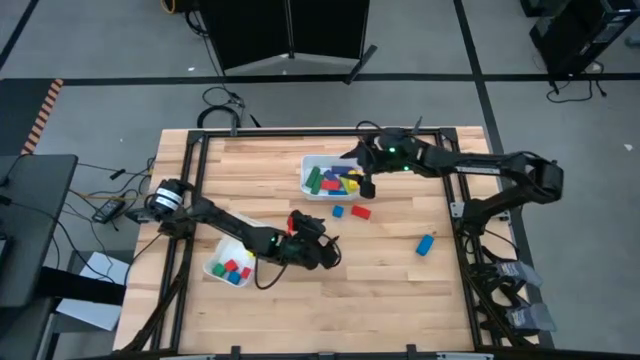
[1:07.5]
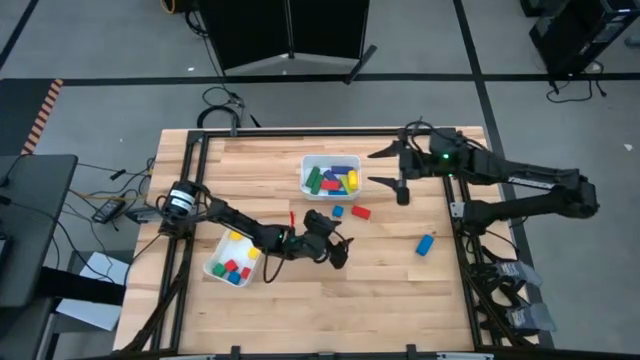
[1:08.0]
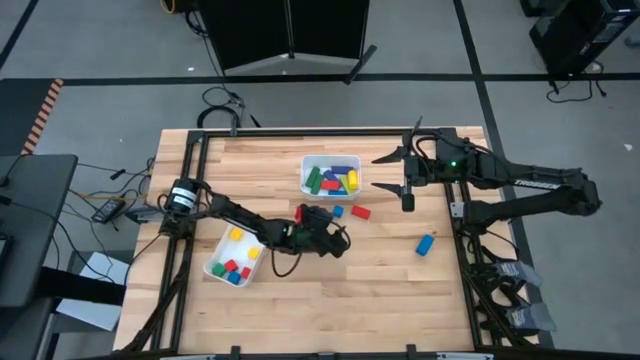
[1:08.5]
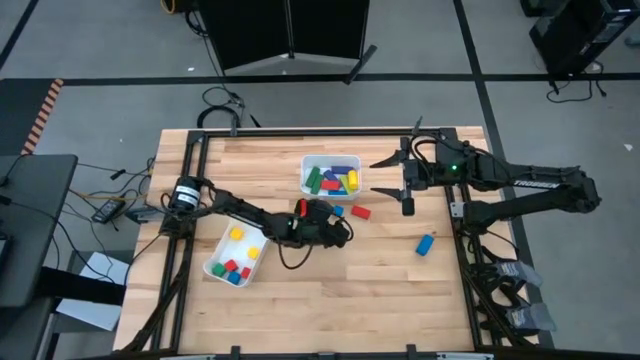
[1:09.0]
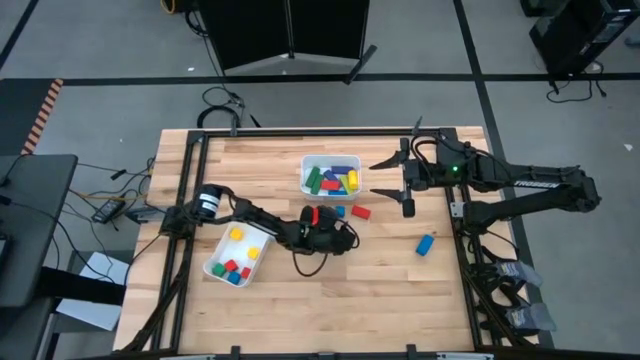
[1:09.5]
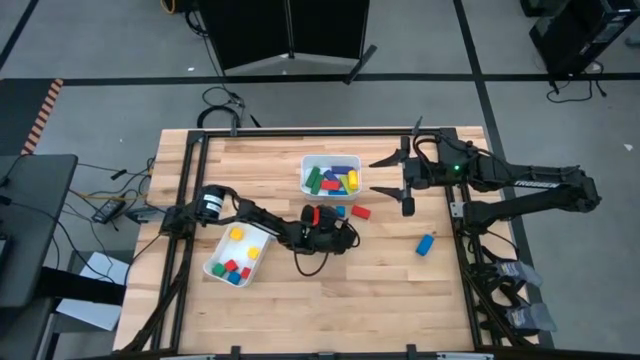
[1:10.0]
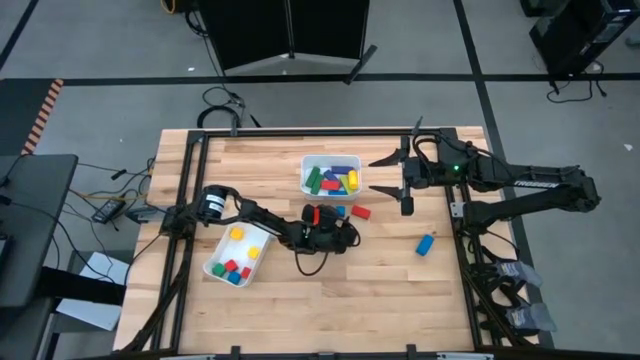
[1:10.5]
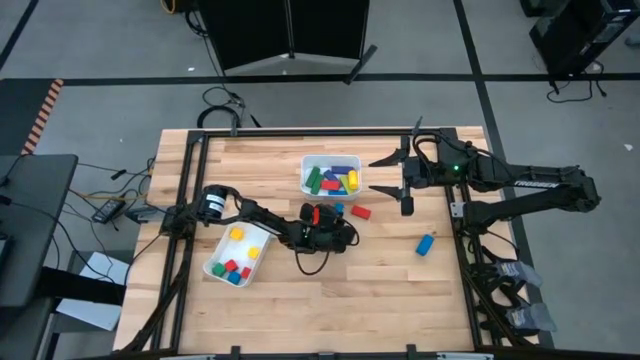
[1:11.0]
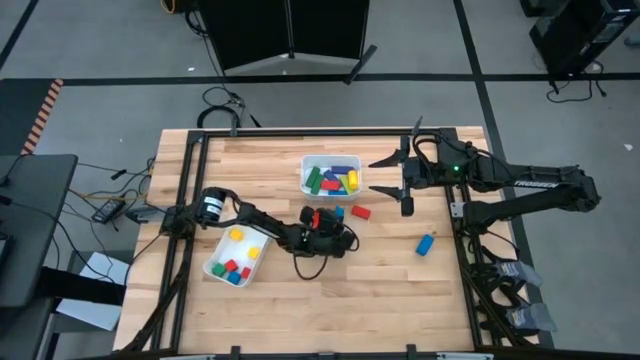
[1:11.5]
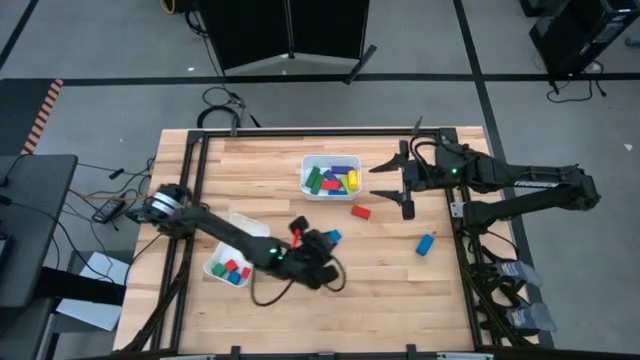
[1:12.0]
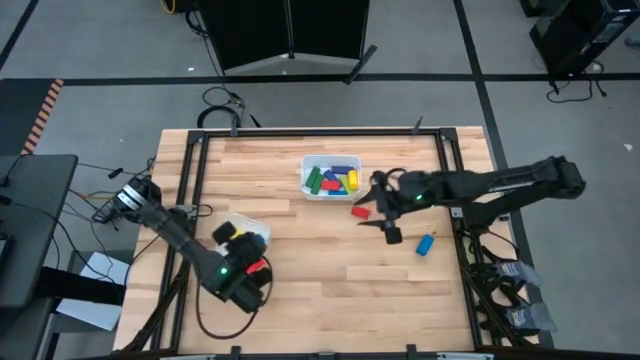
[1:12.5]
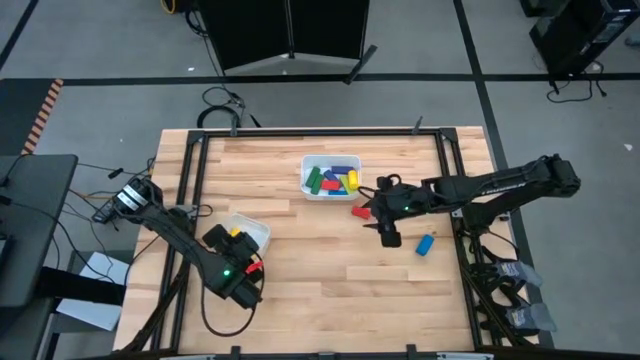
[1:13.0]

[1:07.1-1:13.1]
Task: Sort blocks by size
Put the square blue block into the bottom white bin

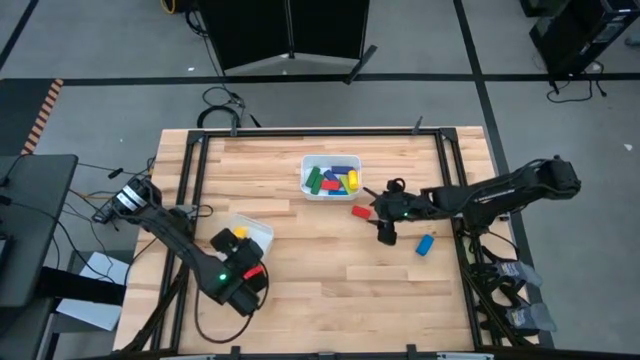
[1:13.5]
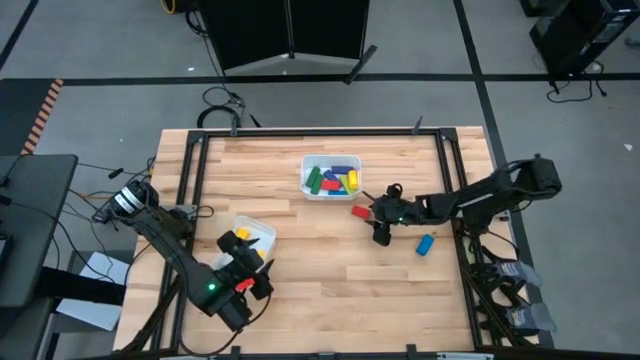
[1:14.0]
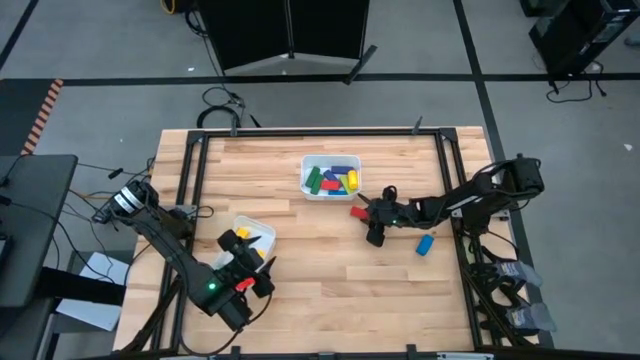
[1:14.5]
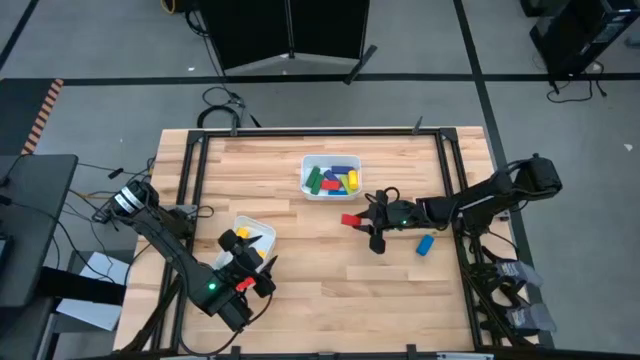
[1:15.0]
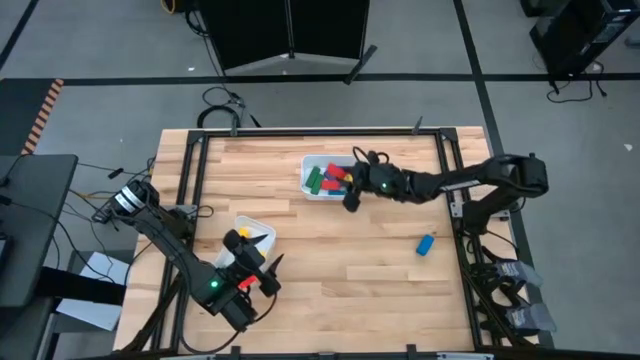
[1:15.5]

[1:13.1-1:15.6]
Put the rectangular red block into the top white bin

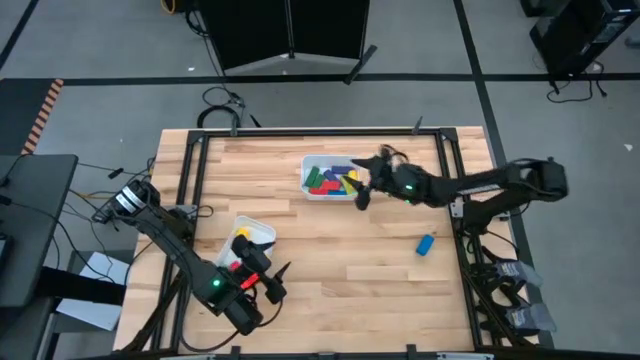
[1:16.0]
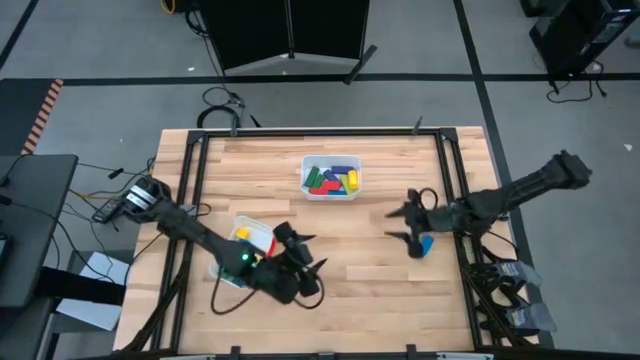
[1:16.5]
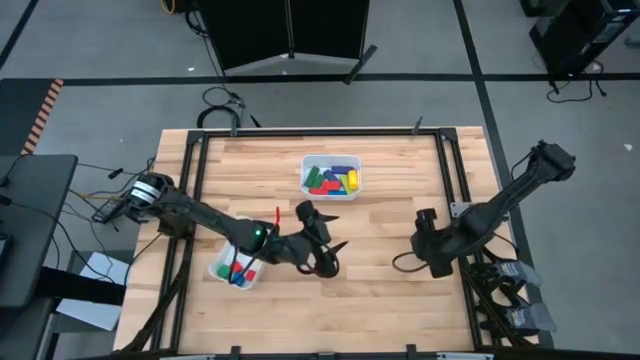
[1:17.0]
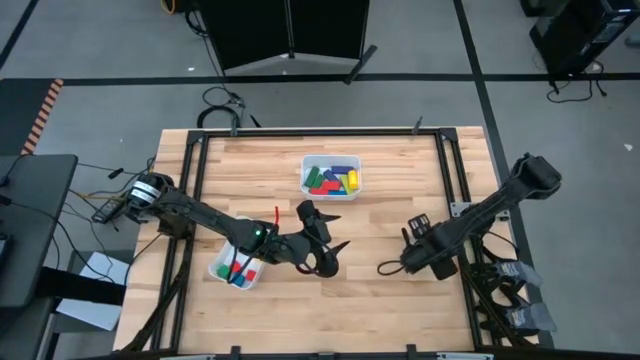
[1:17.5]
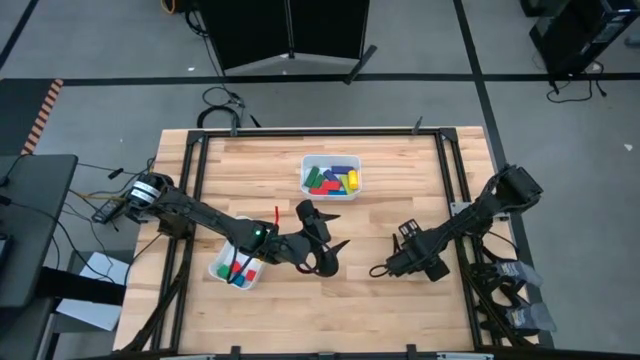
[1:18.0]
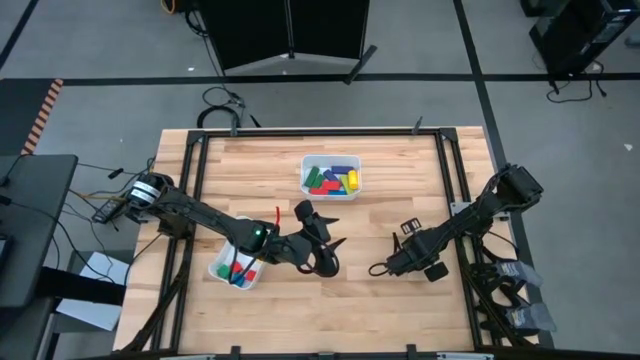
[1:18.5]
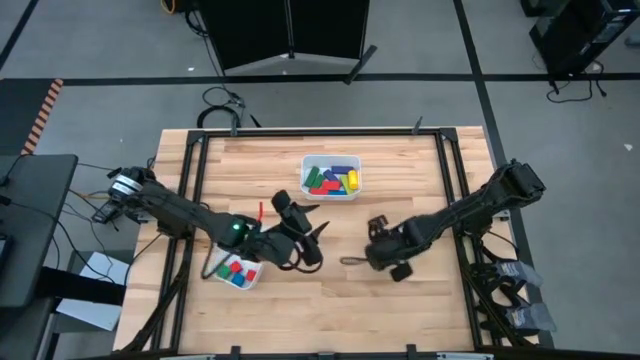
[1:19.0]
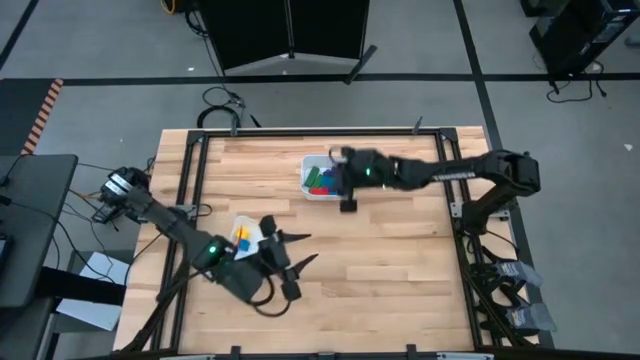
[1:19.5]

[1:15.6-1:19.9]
Put the rectangular blue block into the top white bin

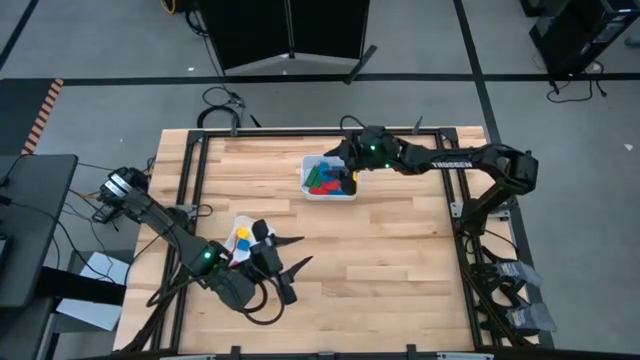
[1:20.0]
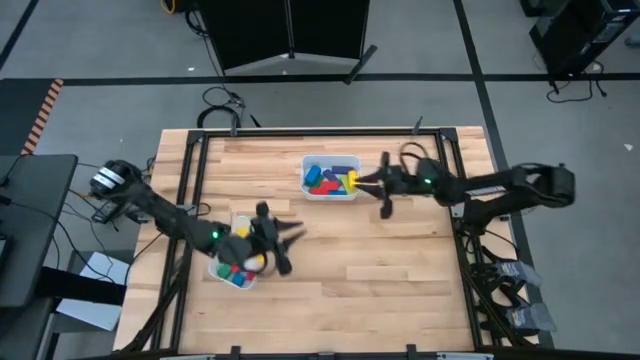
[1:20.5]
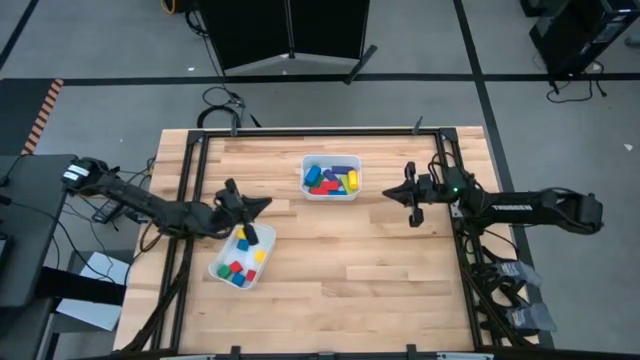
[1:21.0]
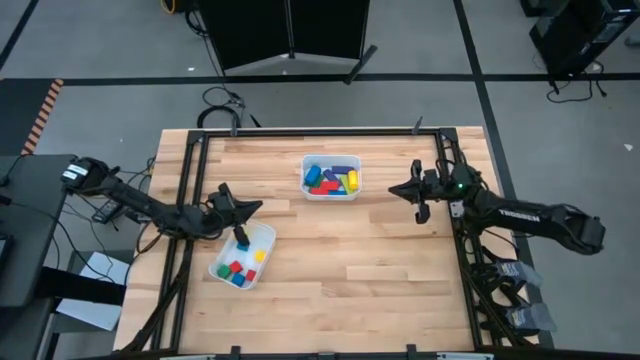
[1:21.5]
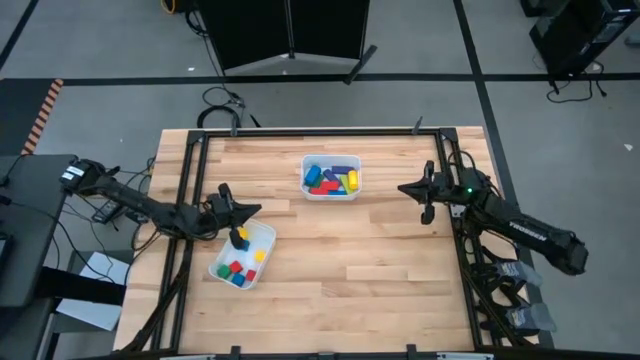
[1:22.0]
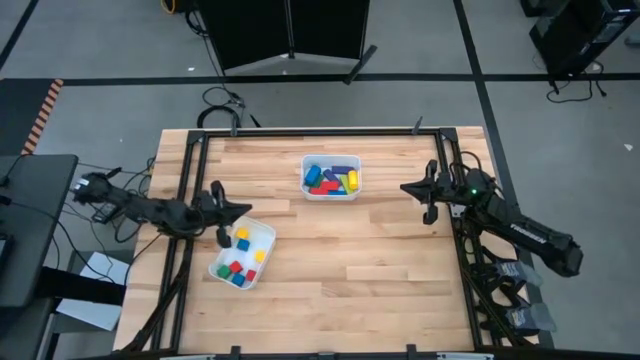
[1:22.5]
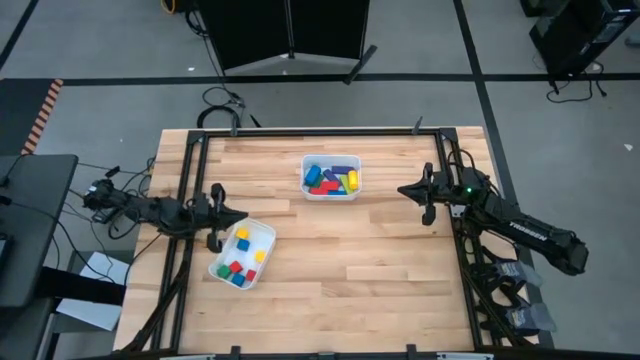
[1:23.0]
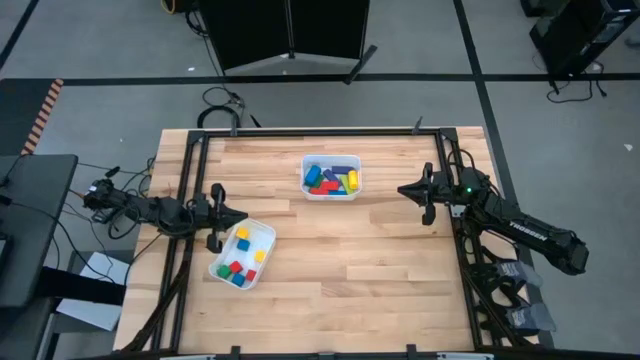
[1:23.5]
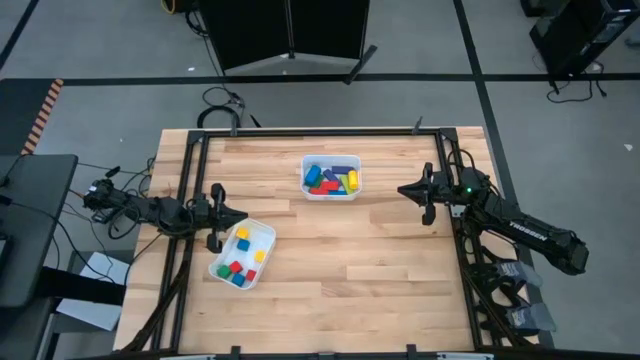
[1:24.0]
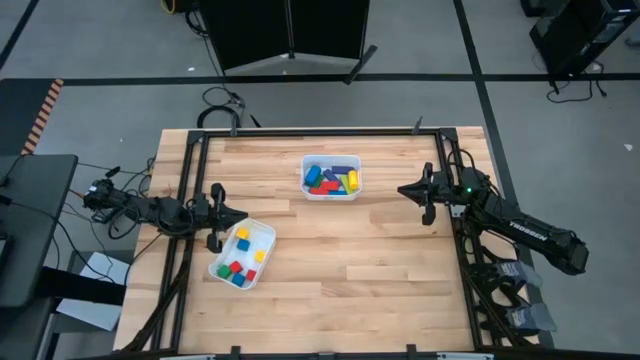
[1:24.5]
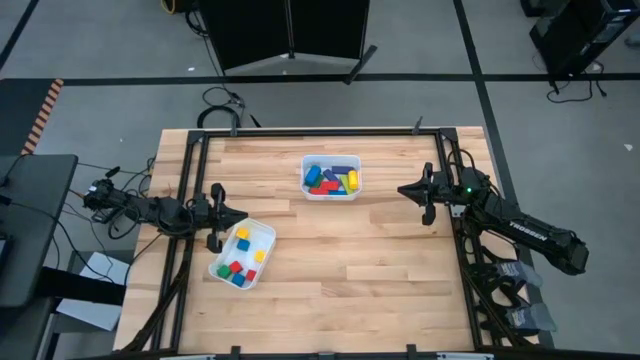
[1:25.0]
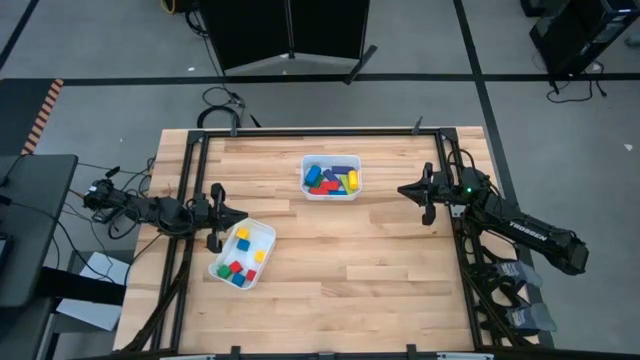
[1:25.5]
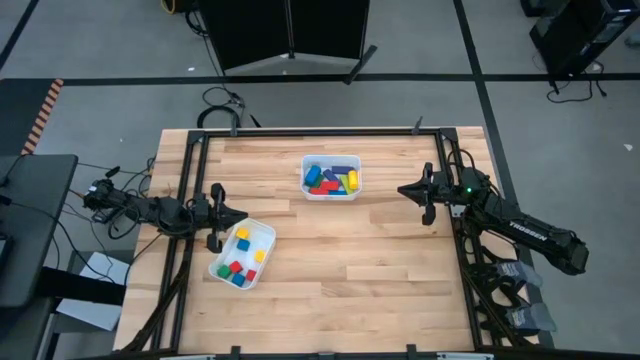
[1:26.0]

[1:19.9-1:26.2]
Return to Home Position

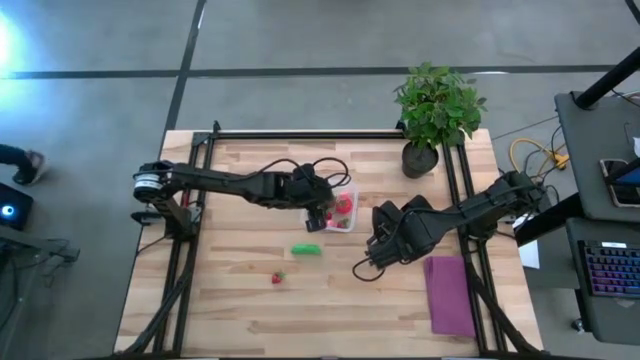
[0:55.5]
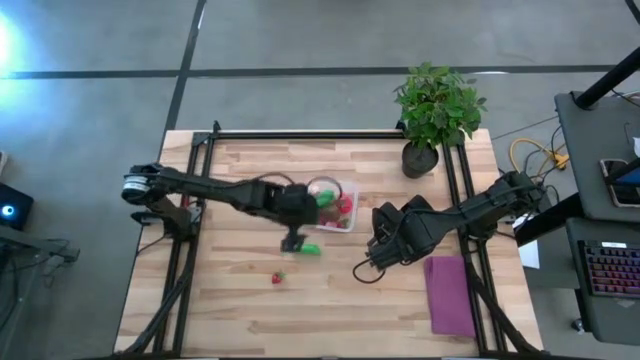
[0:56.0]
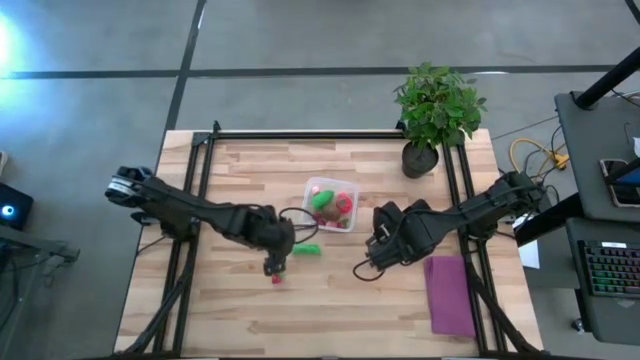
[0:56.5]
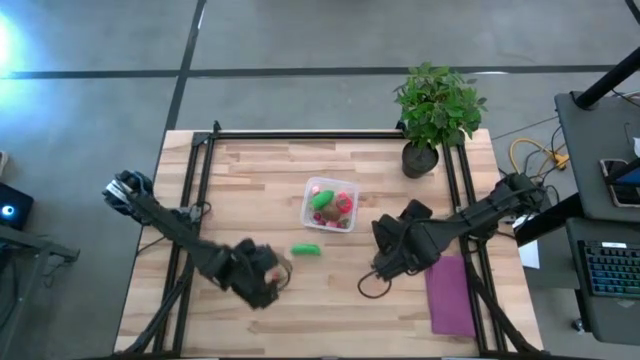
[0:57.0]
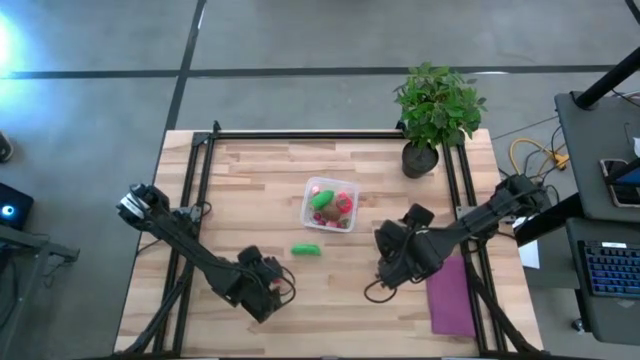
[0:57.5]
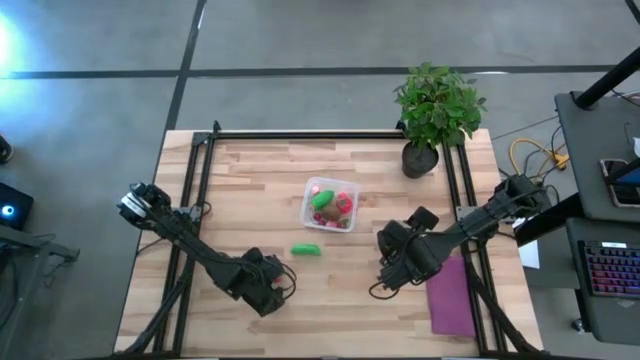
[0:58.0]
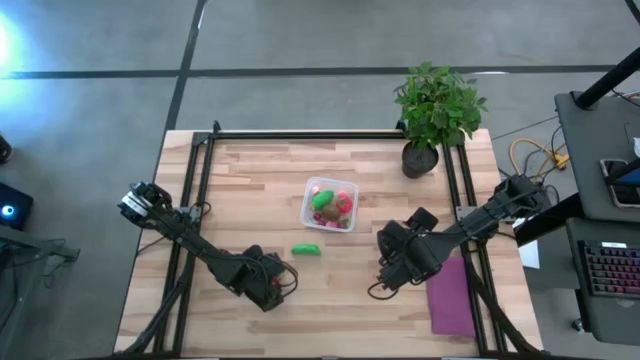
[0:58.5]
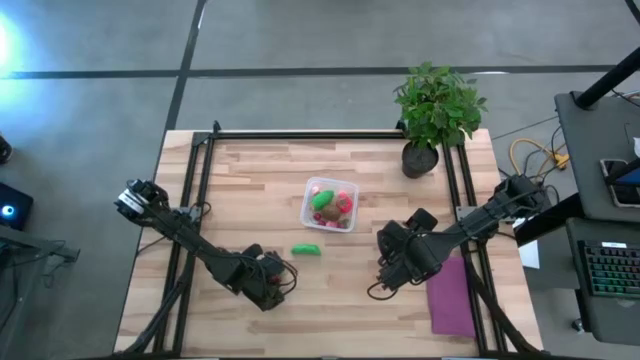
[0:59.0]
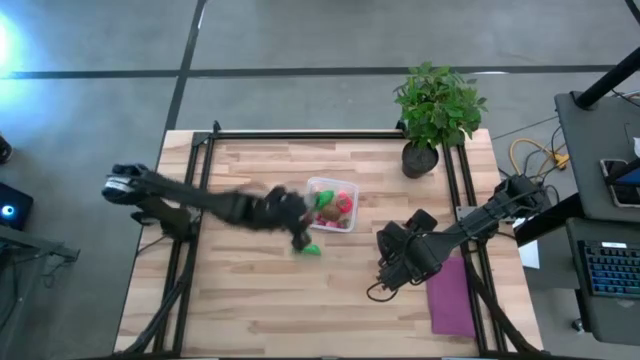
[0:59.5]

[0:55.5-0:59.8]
Task: Pick and placing Produce into tupperware
Put the red strawberry into the transparent bin
